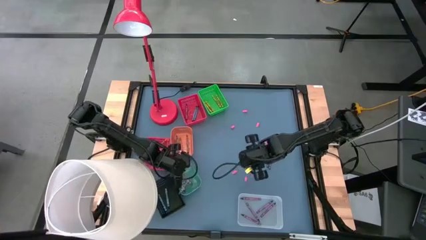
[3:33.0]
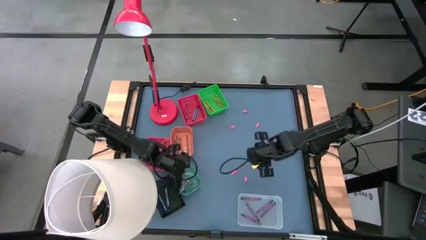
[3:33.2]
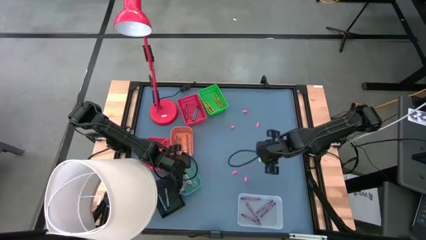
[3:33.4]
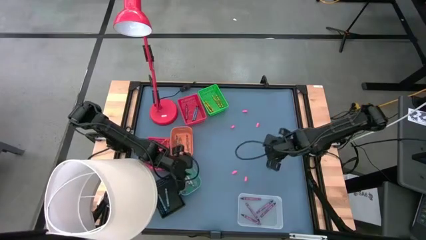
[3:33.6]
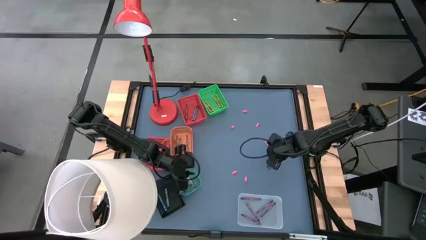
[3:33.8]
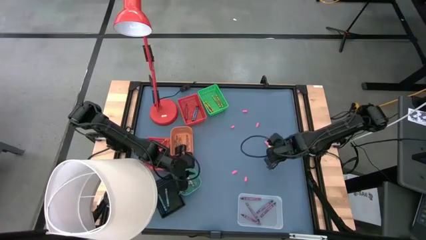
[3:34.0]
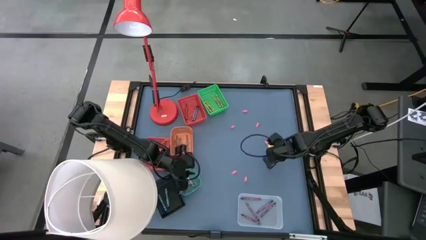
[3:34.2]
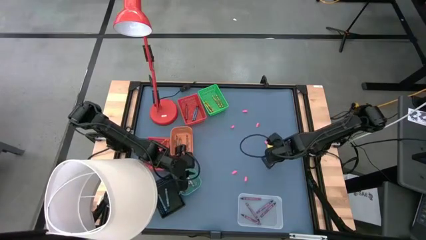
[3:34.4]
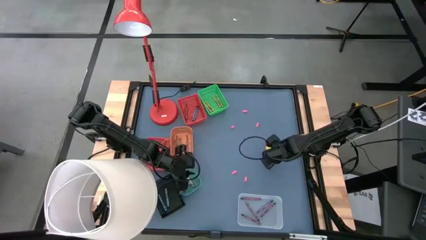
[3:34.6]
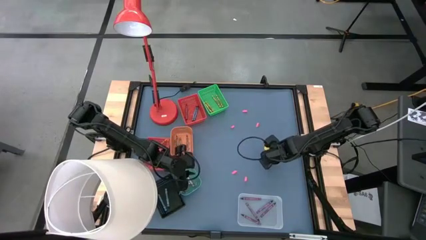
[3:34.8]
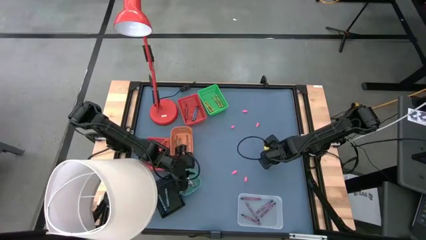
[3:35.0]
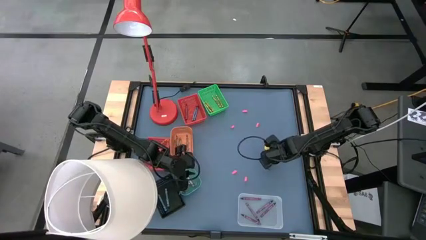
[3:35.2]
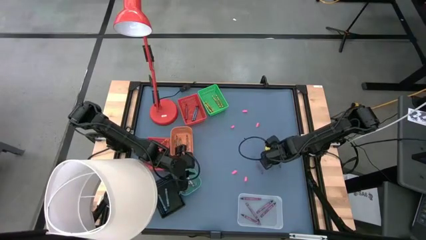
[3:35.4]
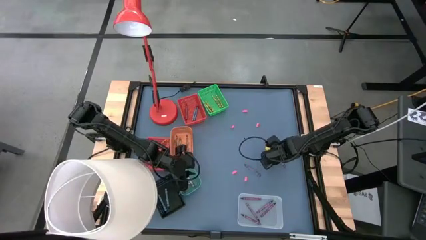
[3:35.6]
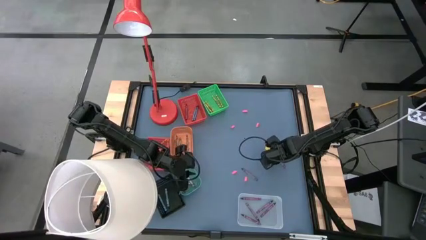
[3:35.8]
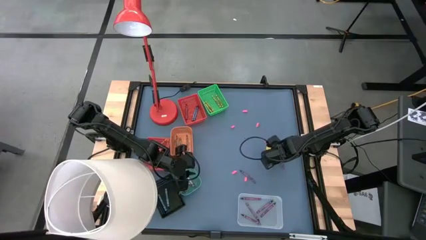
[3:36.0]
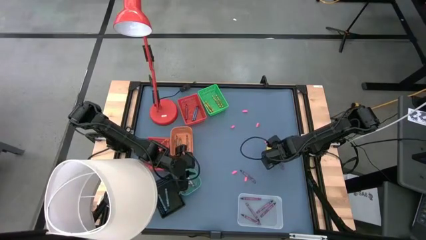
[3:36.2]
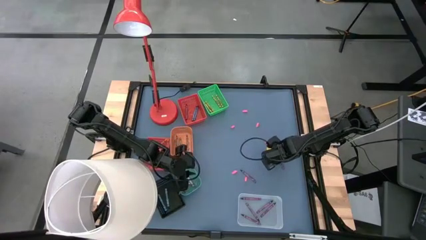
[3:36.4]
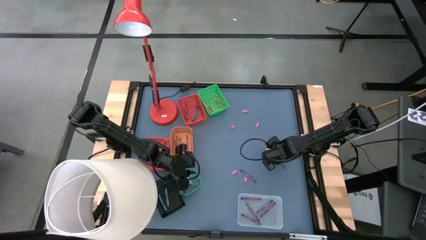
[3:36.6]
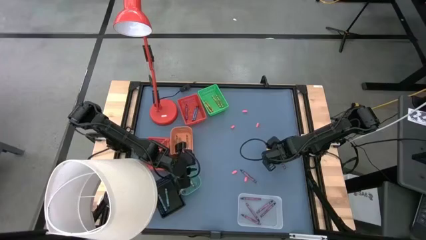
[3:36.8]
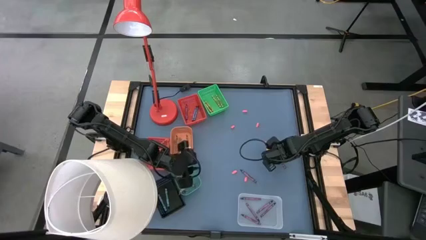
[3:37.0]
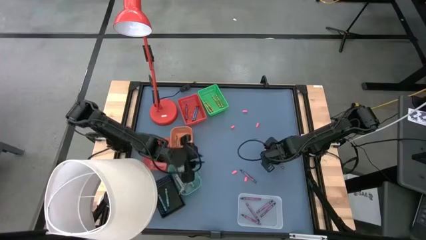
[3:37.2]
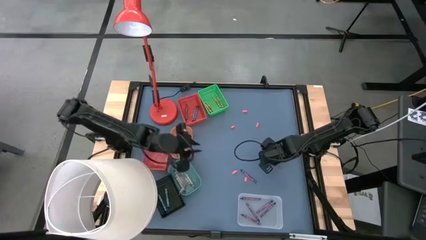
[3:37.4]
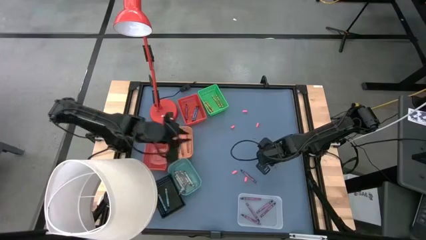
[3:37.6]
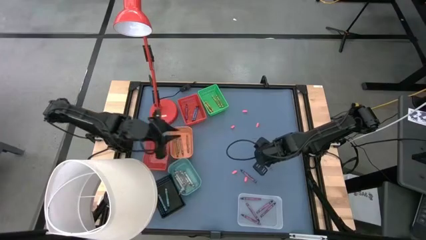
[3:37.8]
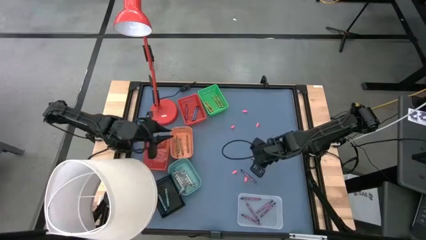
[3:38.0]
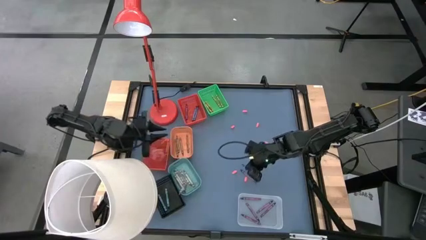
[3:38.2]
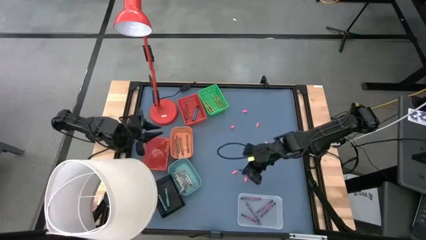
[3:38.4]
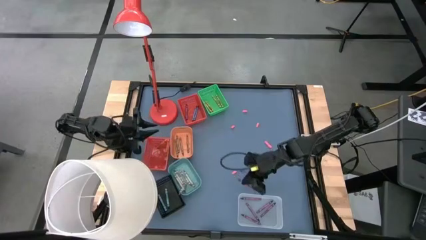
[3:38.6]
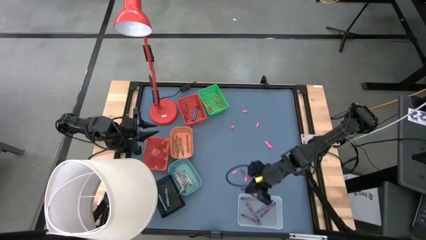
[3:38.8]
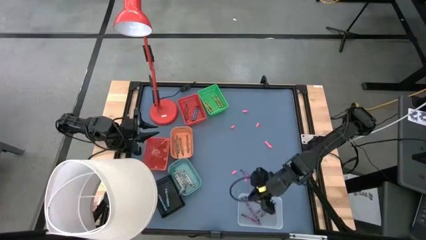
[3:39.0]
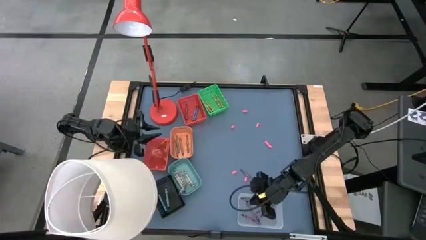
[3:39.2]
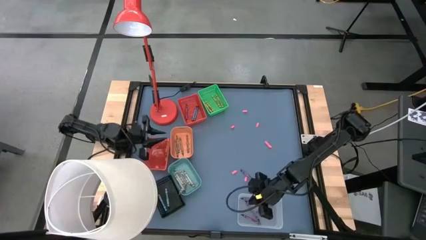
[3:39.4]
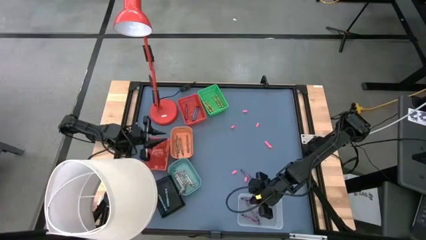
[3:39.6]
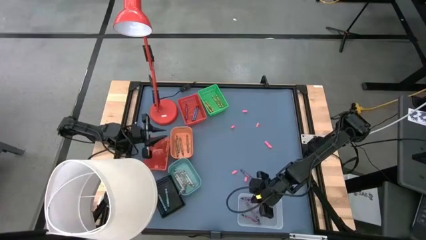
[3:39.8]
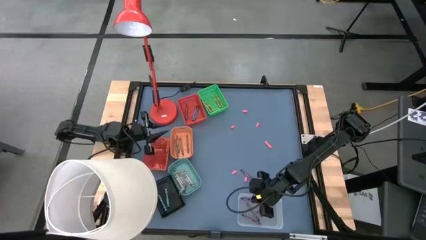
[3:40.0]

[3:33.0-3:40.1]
Task: Sort crayons
Put the purple crayon into the white bin

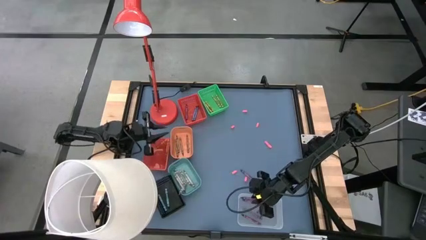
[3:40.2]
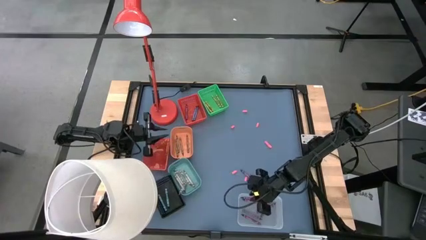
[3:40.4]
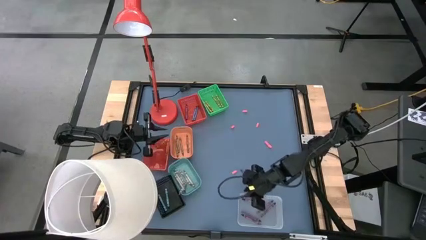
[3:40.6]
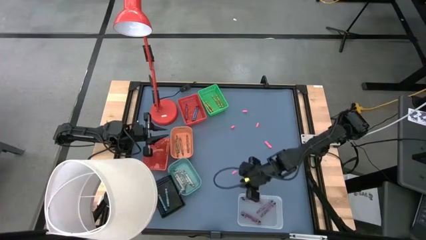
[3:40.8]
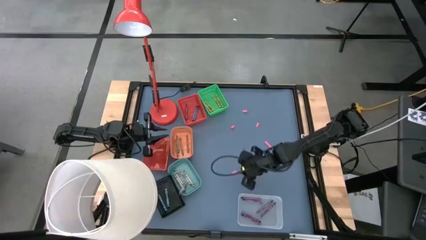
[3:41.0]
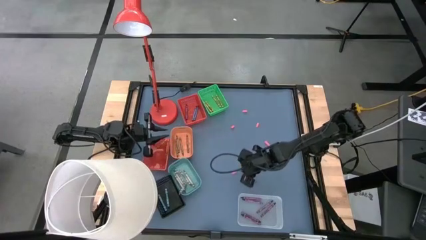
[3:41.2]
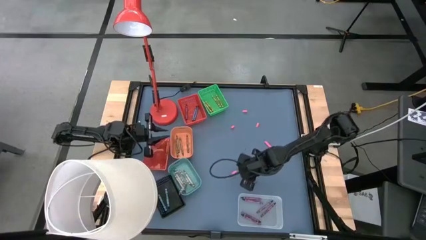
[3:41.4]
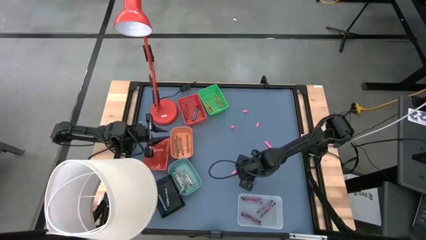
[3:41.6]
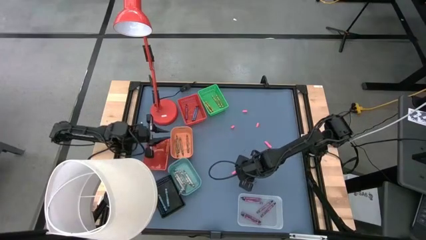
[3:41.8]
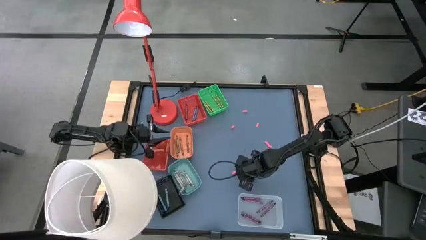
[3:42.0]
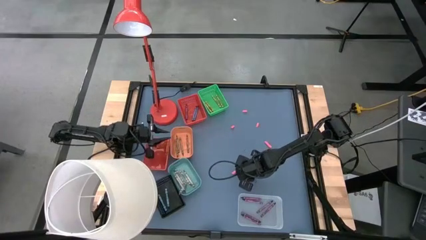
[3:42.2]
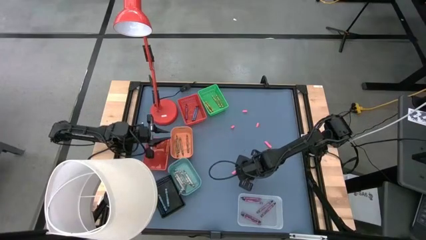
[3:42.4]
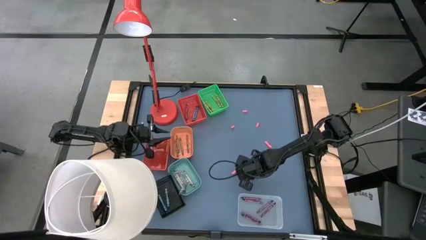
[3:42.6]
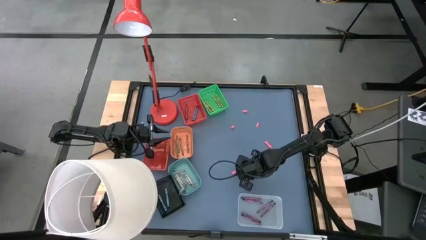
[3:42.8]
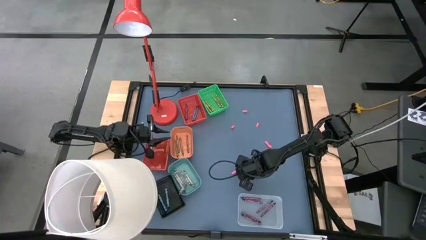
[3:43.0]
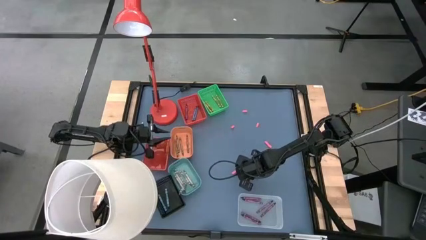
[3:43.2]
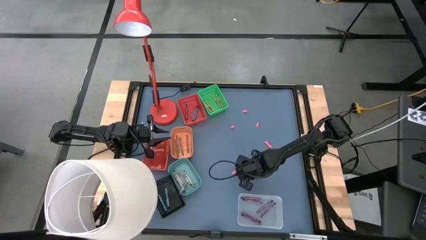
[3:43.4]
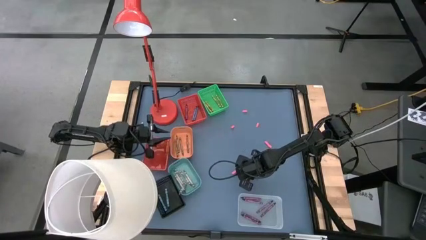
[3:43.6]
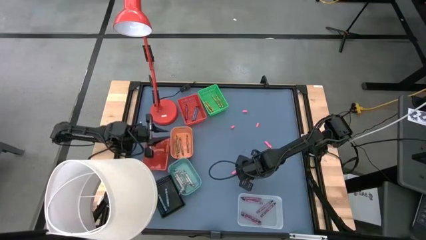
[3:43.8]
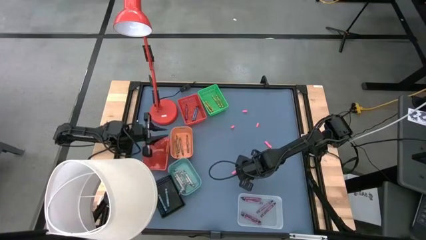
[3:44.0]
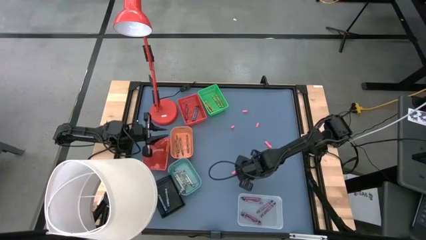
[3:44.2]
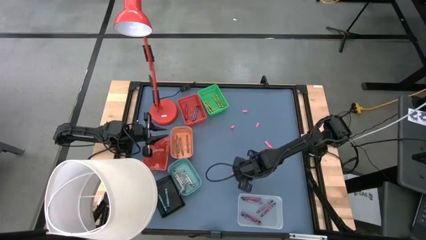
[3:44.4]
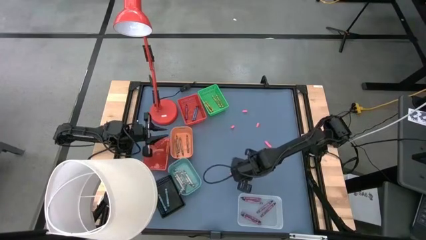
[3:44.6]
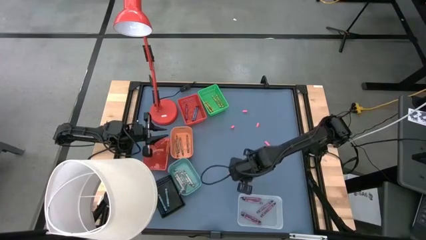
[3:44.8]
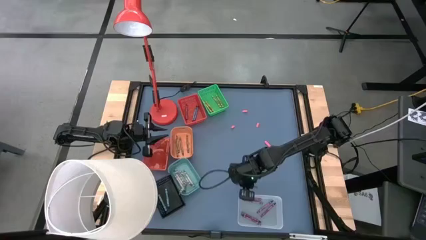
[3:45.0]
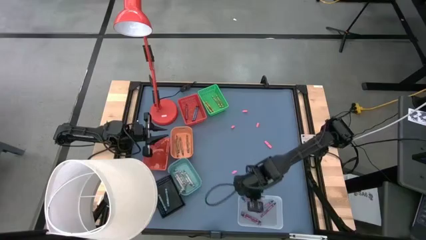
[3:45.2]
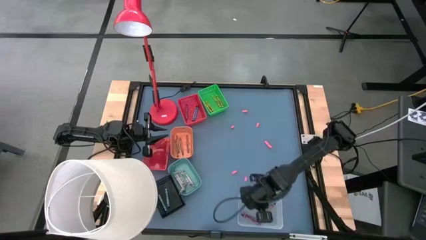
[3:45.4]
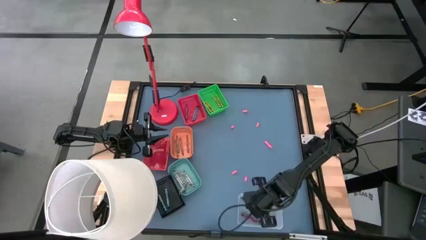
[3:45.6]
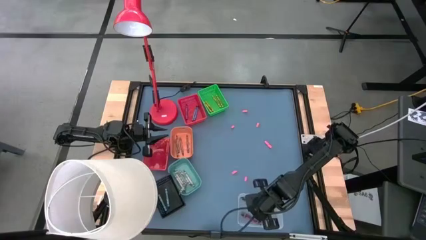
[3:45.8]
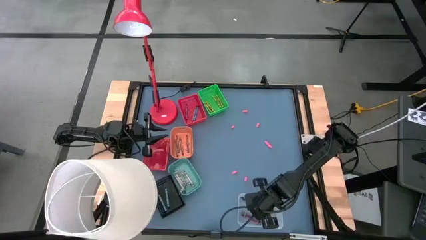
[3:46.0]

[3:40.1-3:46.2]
Put the purple crayon into the white bin

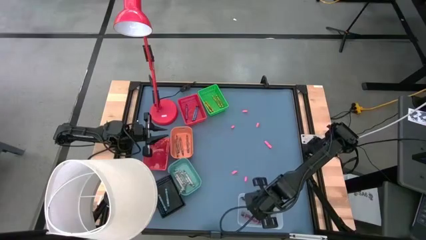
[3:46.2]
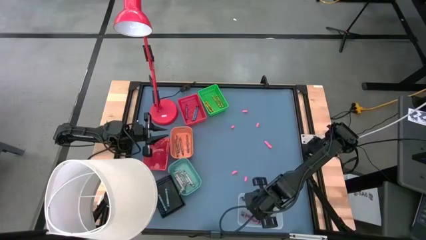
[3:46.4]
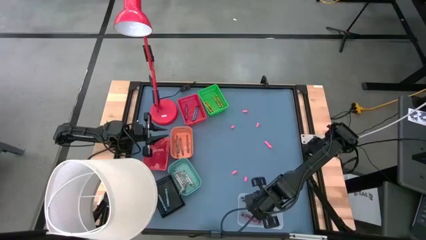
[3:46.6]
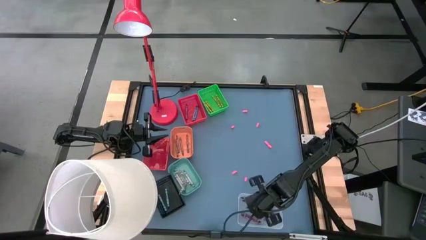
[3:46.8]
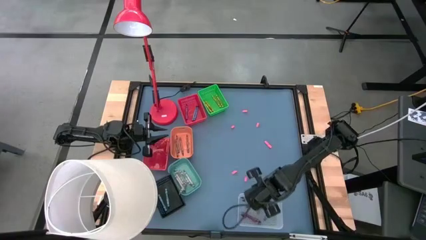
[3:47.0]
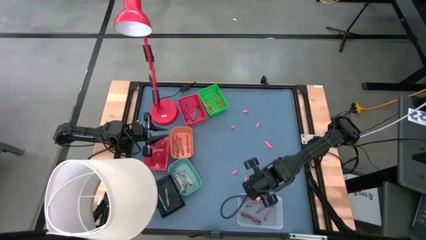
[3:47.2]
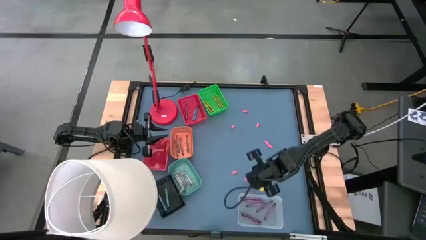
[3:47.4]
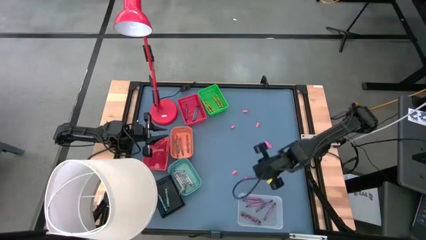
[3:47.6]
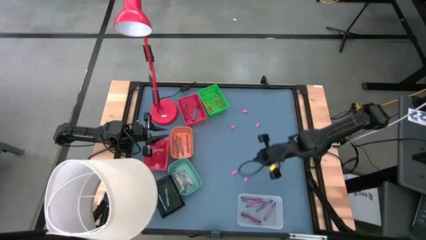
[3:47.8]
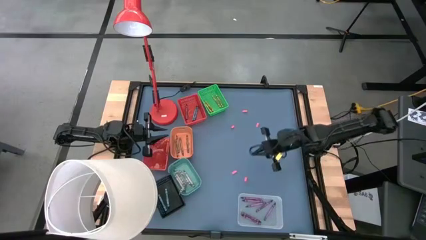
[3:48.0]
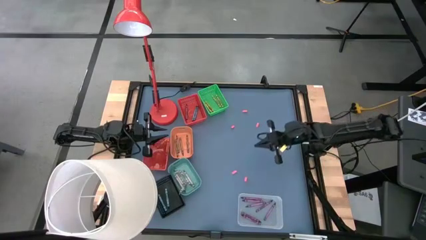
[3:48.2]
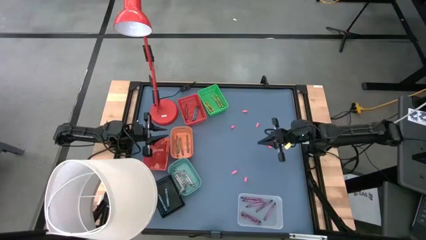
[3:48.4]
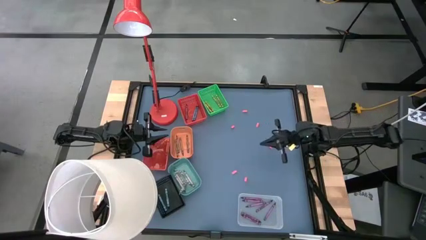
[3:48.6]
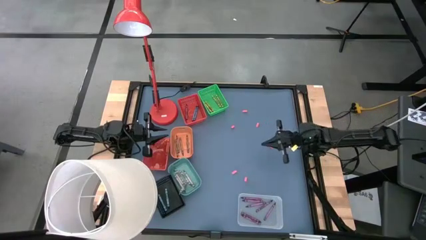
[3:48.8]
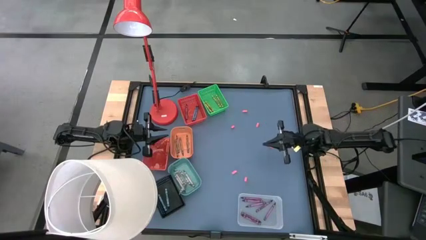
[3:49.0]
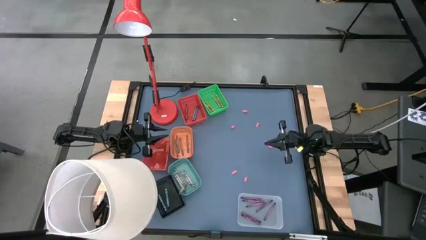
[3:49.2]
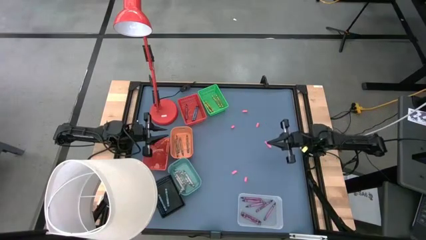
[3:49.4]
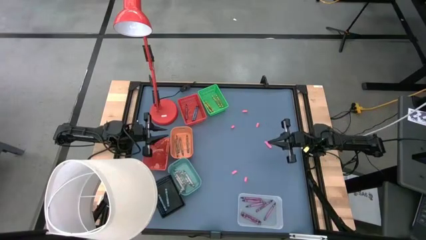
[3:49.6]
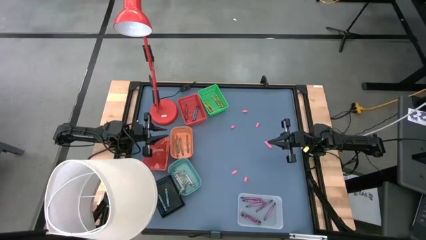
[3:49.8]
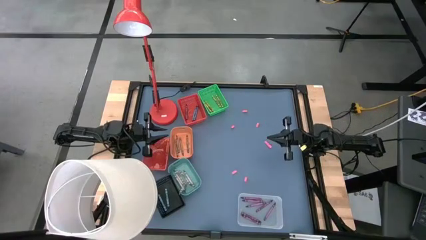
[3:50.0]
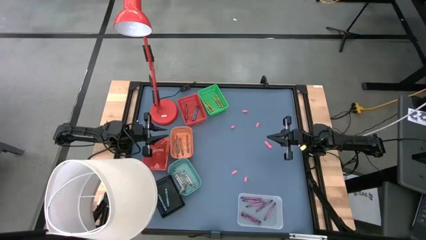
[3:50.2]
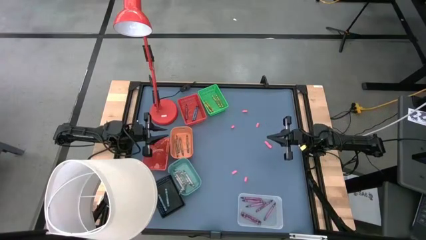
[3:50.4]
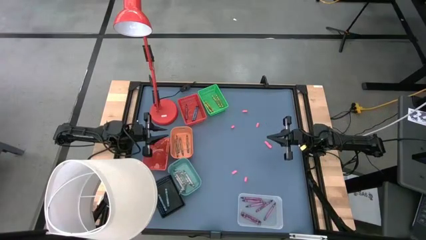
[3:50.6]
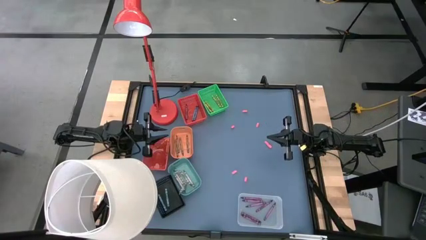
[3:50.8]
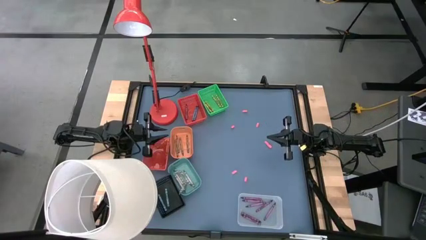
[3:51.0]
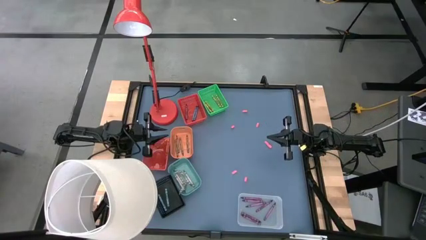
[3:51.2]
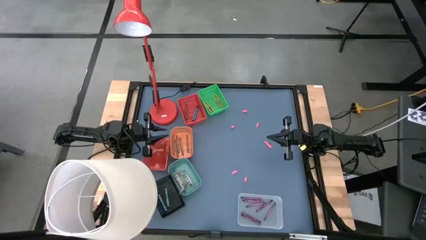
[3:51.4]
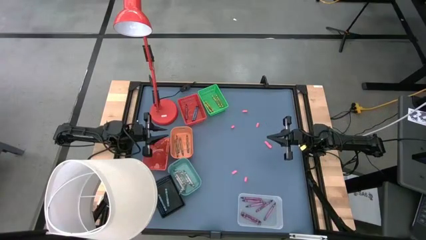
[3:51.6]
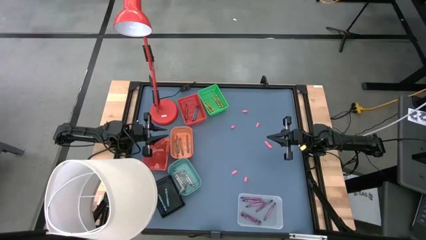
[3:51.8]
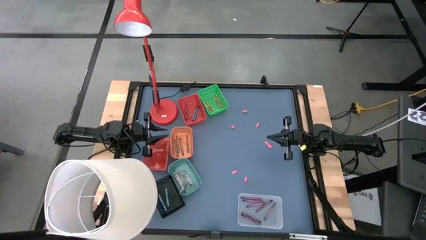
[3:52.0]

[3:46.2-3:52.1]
Return to Home Position
